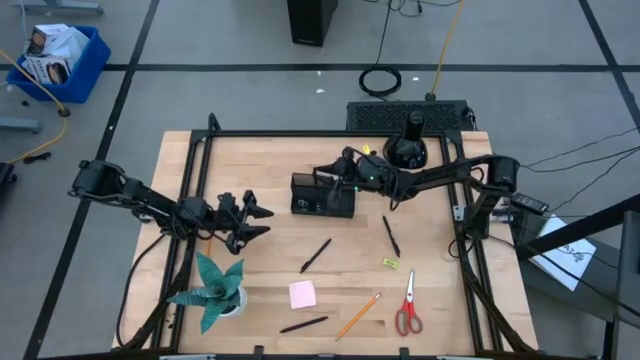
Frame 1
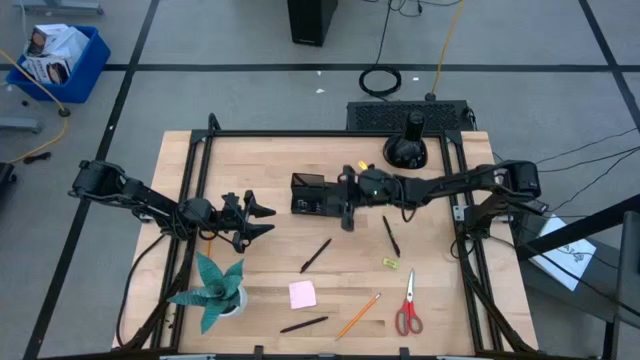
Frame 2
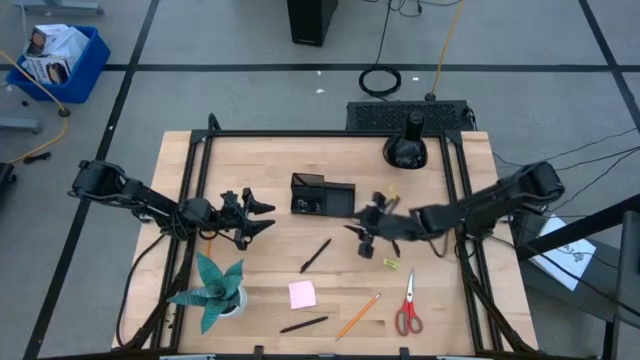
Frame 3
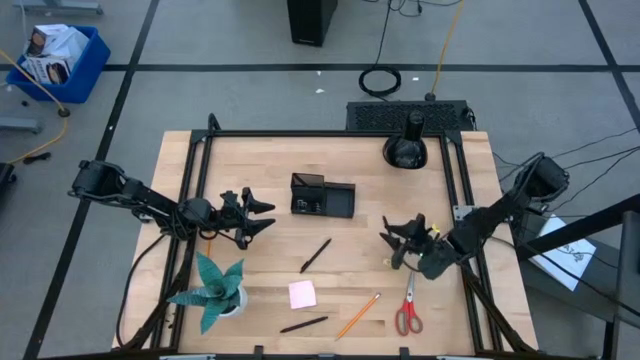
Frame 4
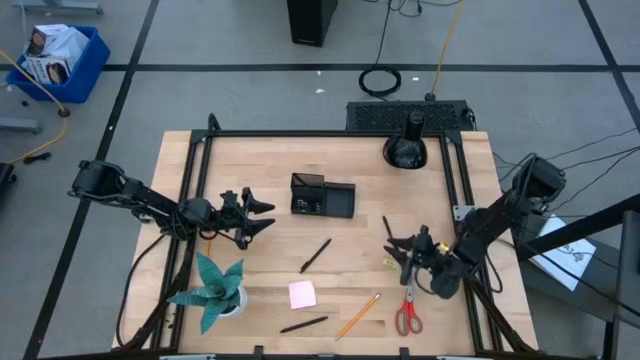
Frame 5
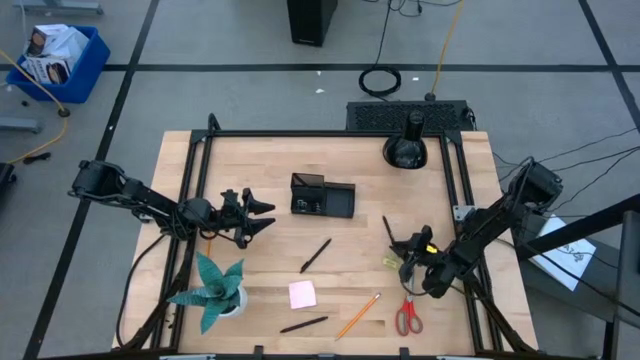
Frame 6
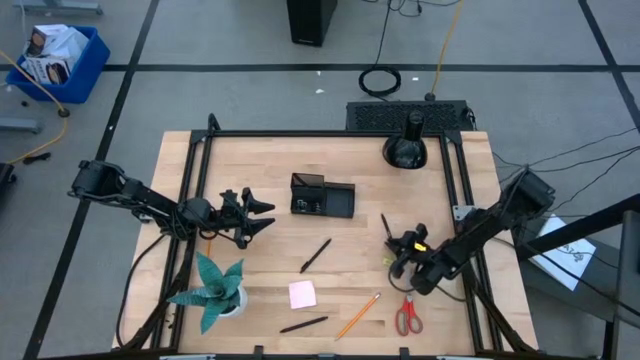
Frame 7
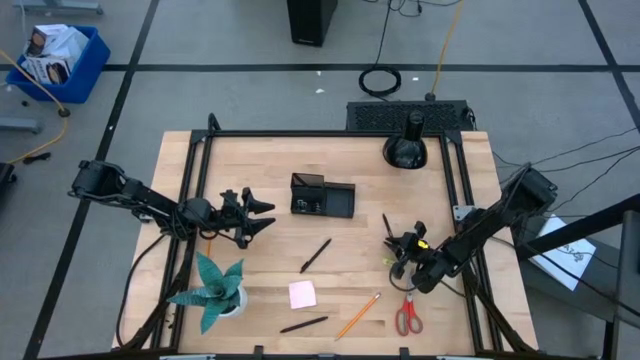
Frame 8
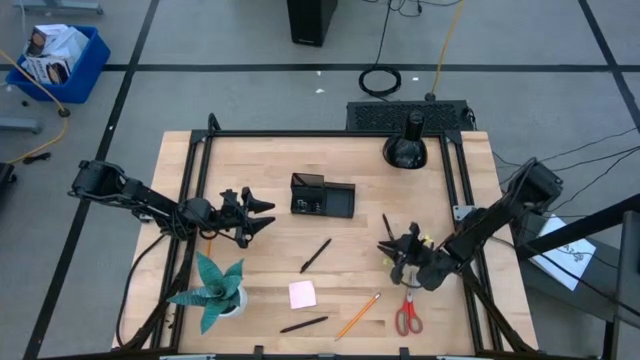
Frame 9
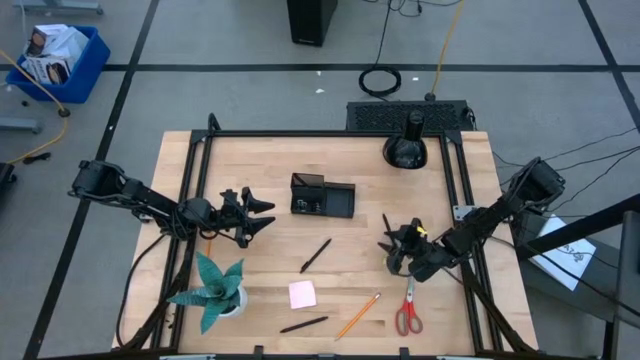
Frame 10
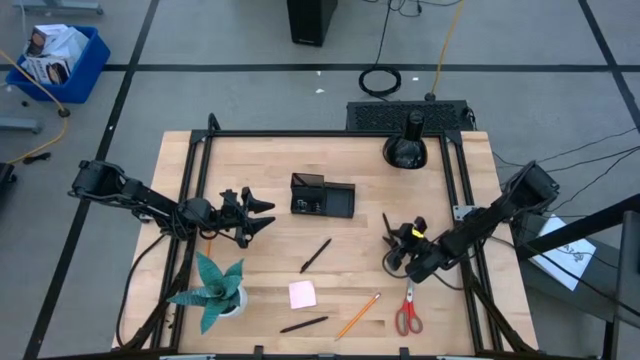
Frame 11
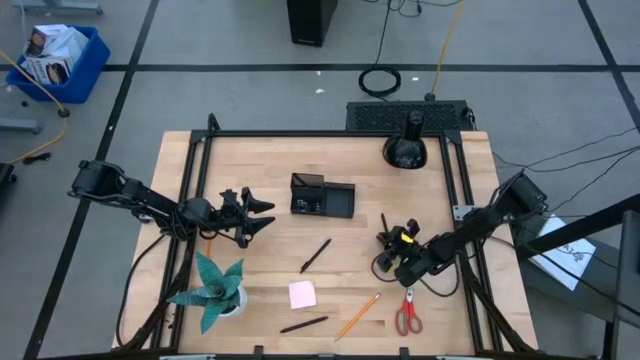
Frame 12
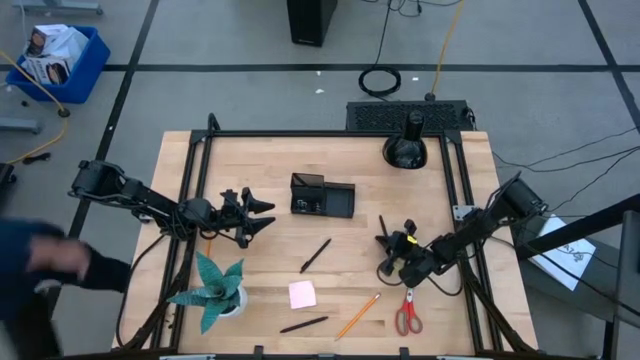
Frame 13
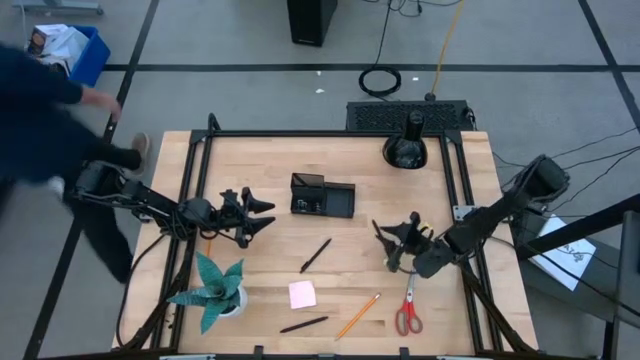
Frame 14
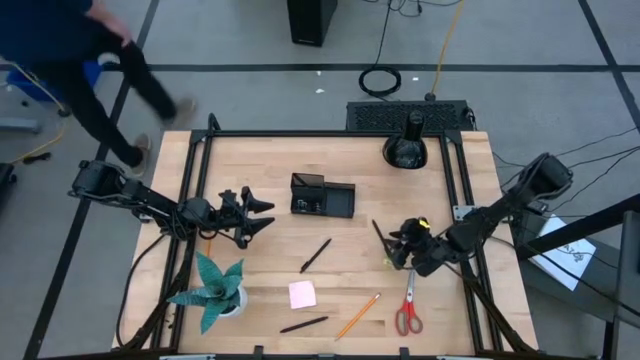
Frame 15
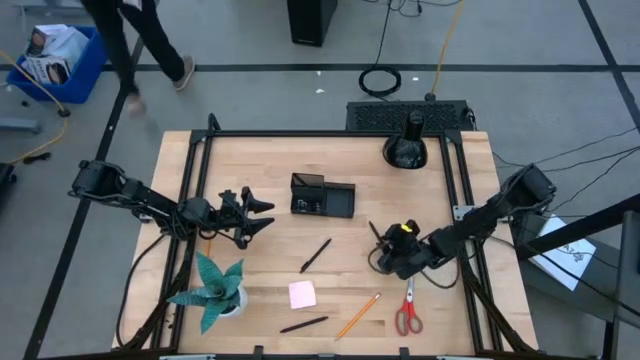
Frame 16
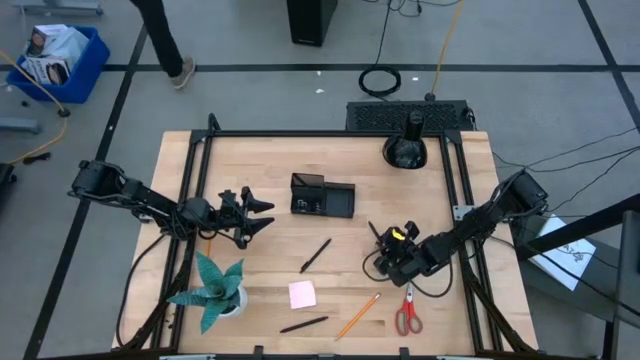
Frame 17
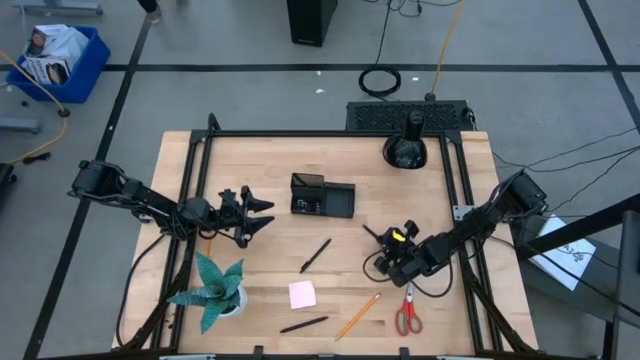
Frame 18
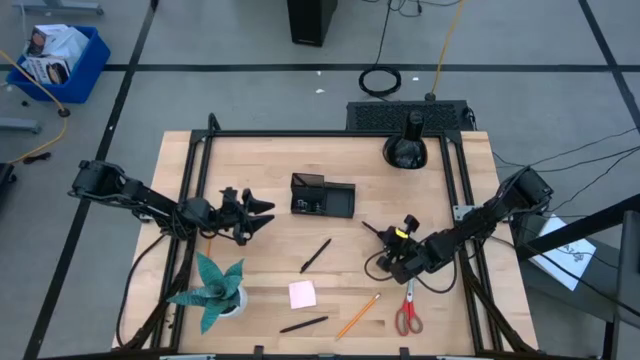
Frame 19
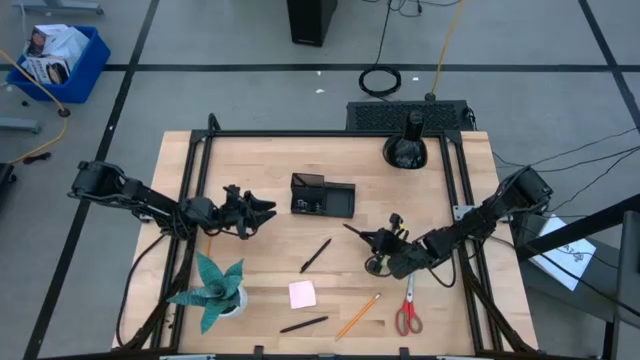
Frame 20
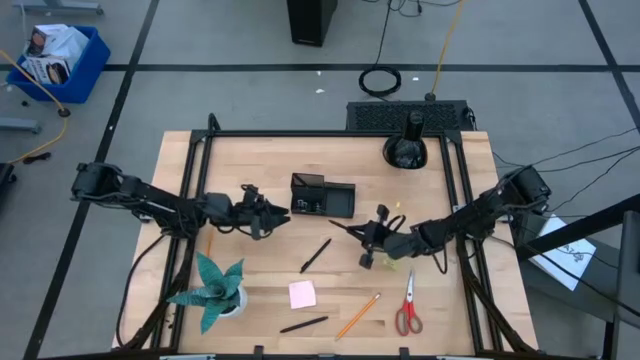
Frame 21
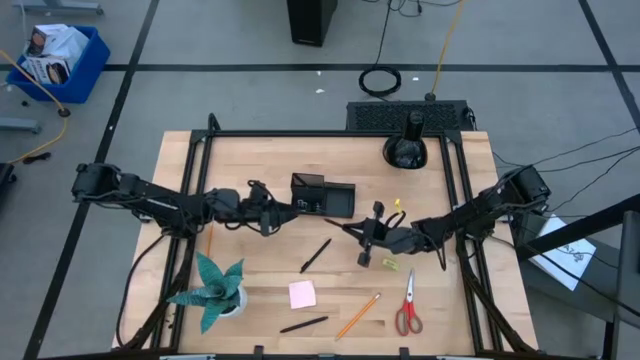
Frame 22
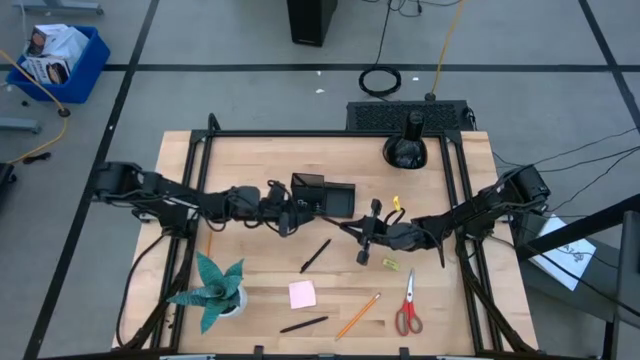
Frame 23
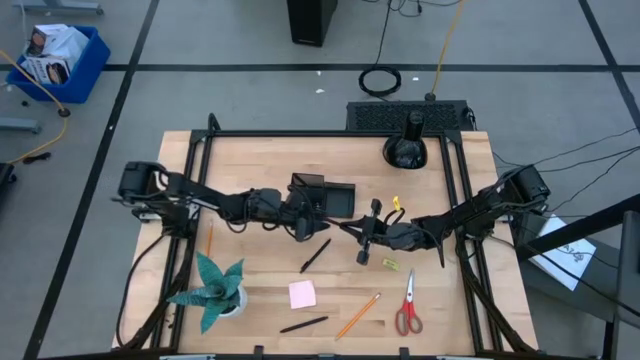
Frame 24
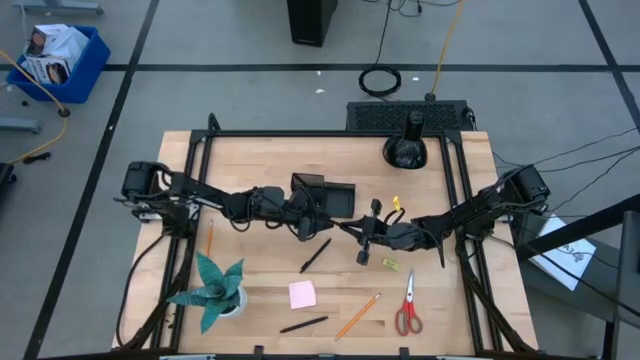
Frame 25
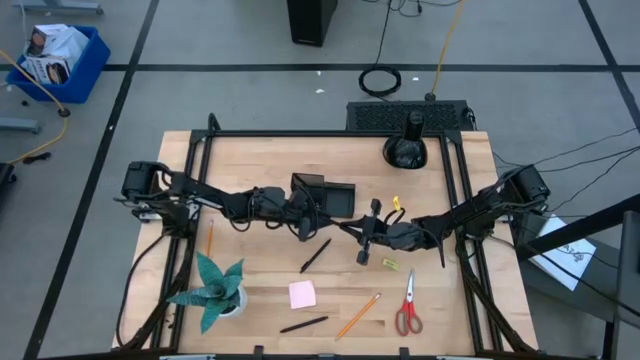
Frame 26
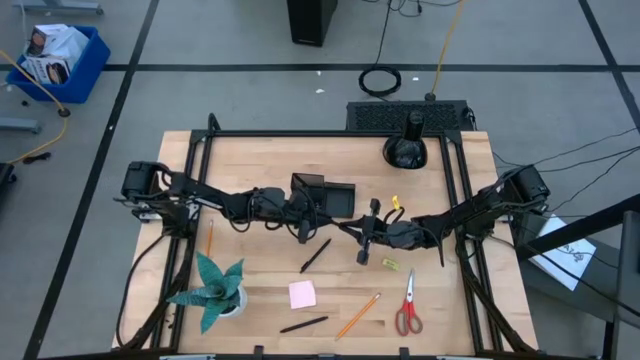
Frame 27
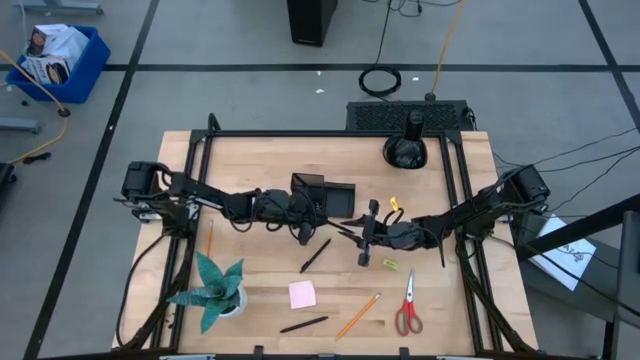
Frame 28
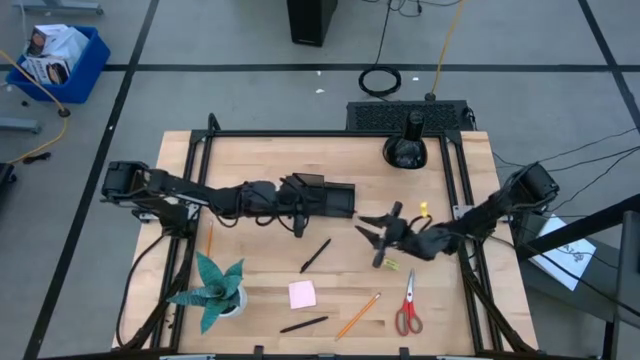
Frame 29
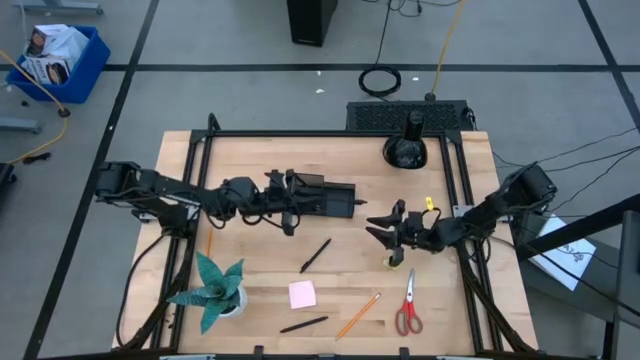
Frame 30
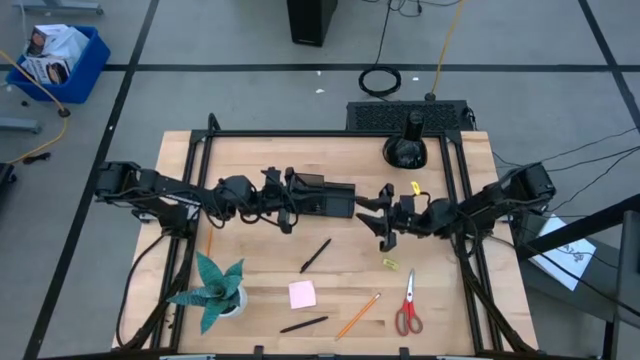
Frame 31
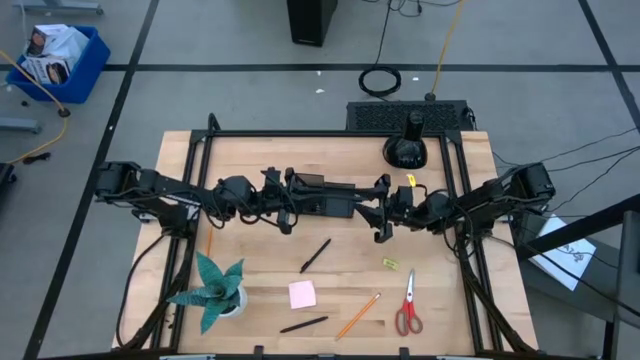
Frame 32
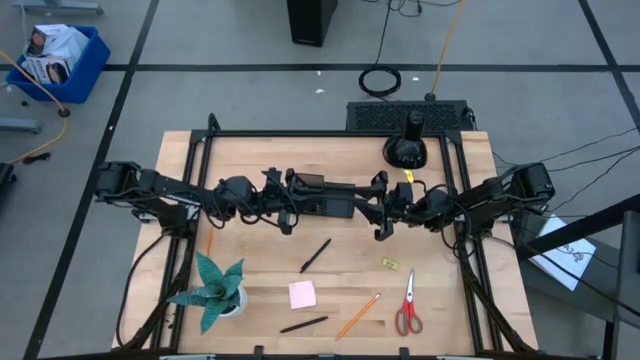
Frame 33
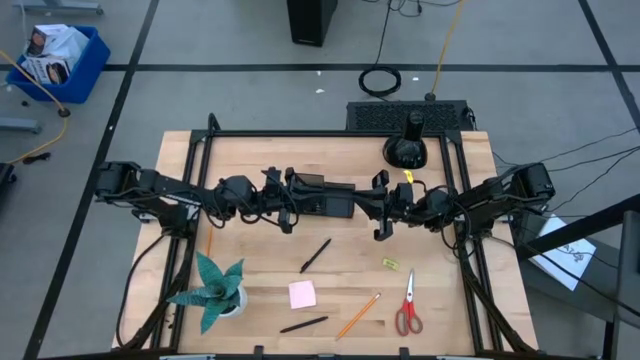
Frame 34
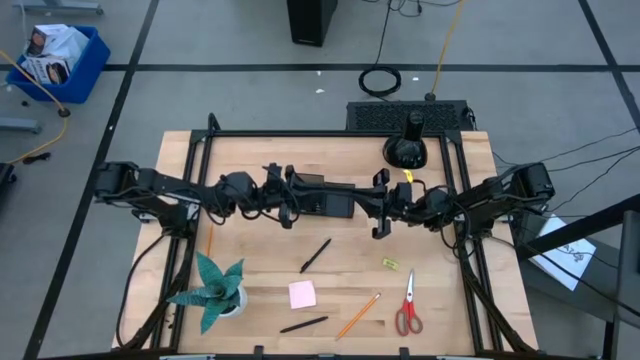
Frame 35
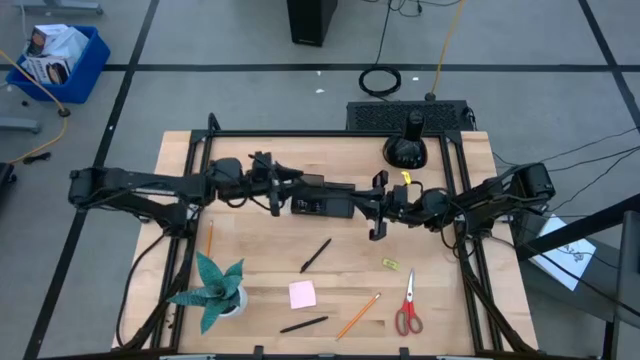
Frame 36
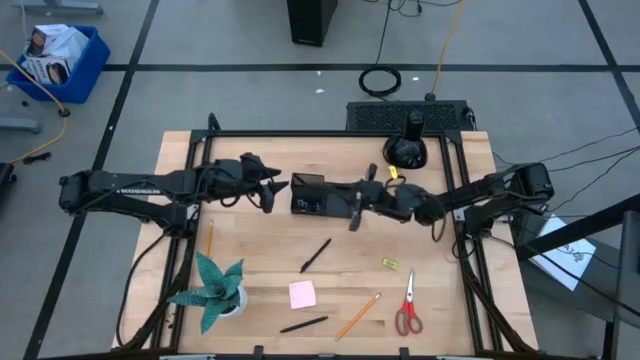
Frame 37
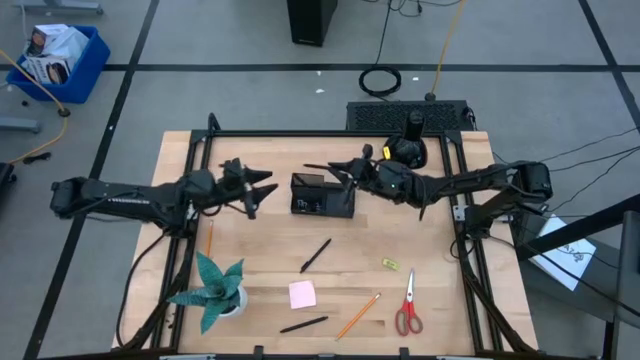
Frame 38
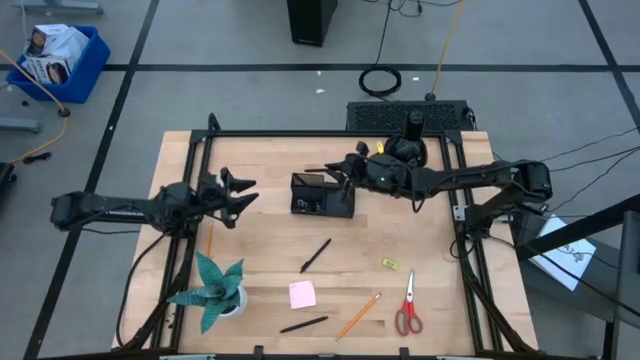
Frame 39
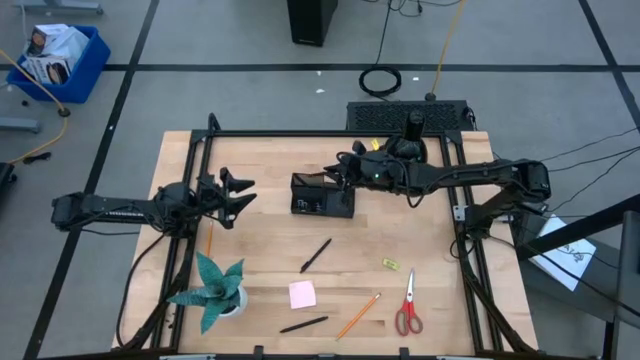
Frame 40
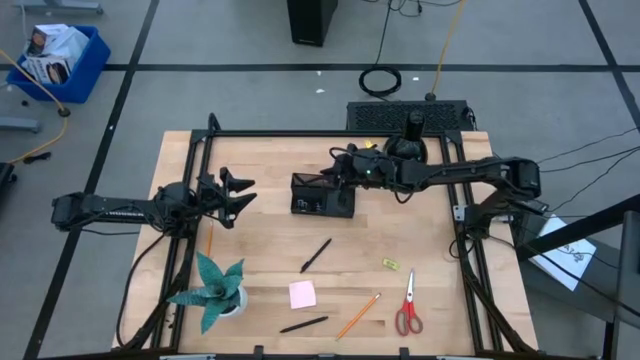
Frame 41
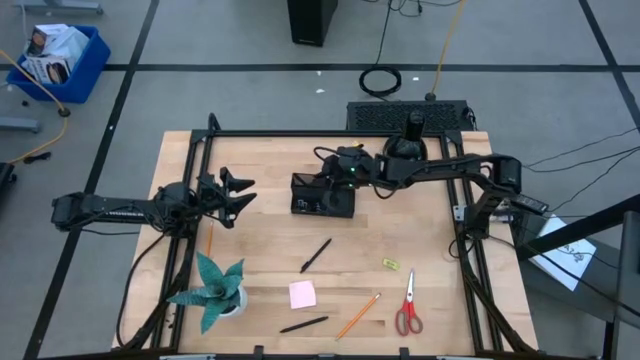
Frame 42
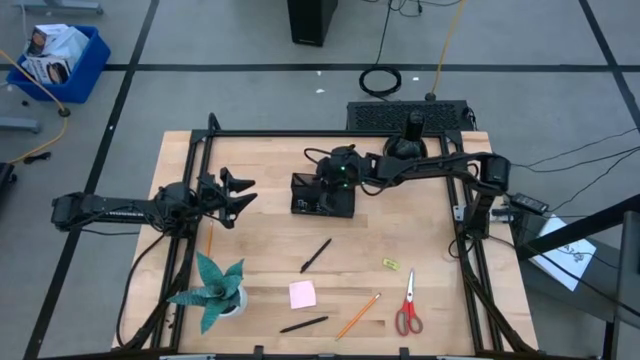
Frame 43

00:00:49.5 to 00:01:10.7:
Task: Pick and place office supplies into organizer
Put the black pen into the black desk organizer
